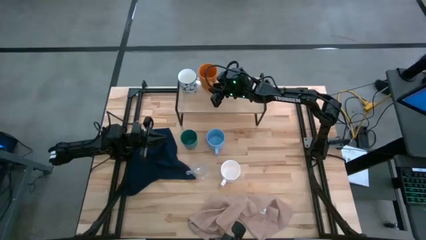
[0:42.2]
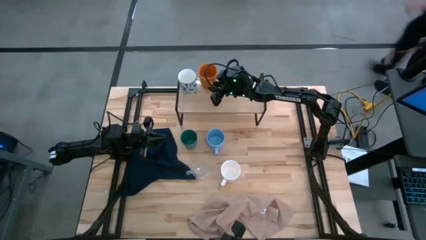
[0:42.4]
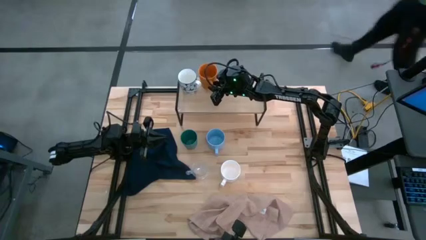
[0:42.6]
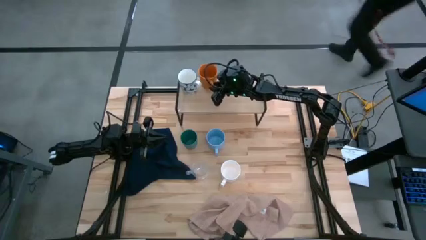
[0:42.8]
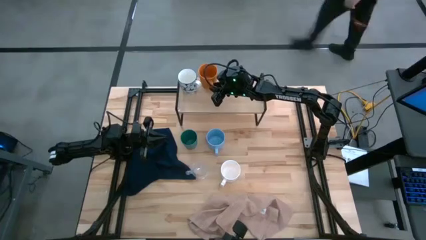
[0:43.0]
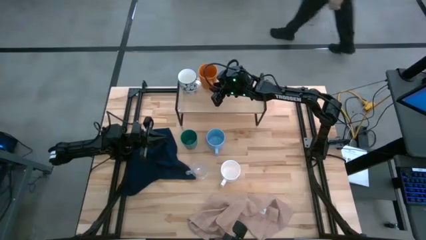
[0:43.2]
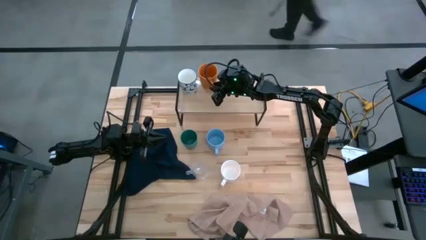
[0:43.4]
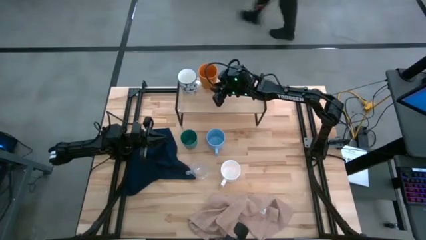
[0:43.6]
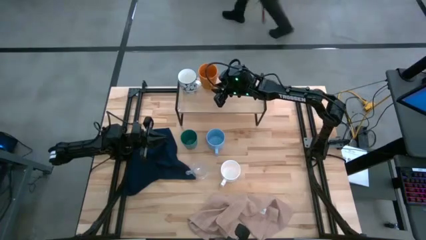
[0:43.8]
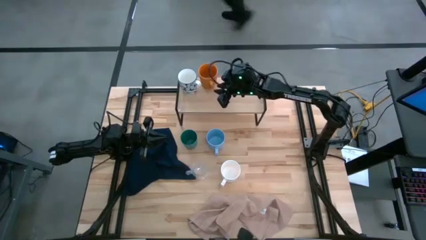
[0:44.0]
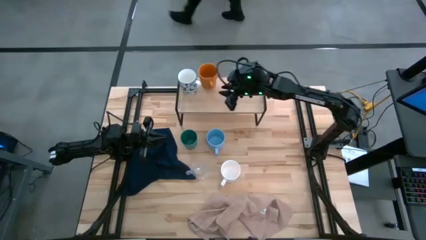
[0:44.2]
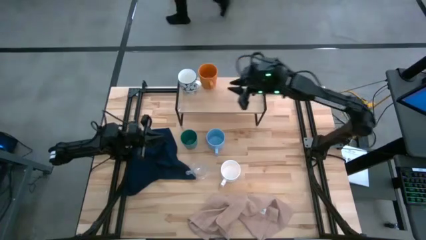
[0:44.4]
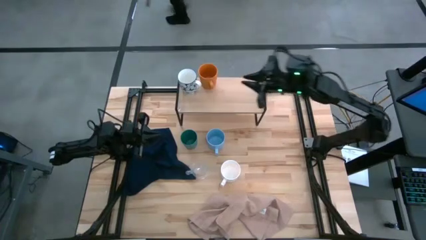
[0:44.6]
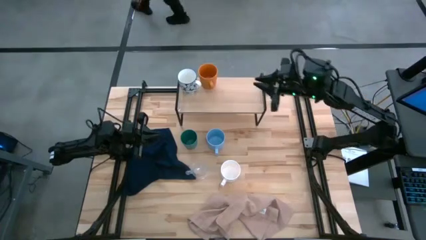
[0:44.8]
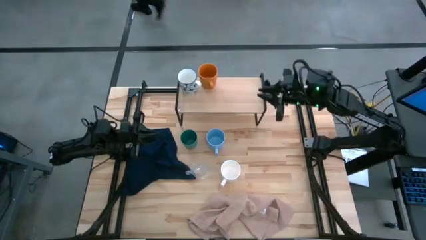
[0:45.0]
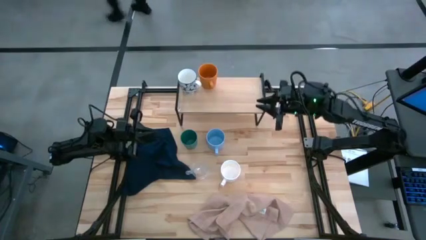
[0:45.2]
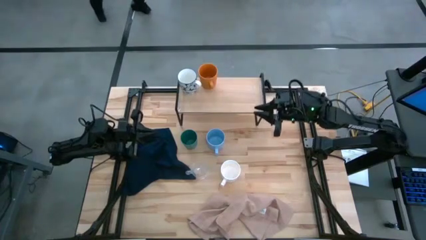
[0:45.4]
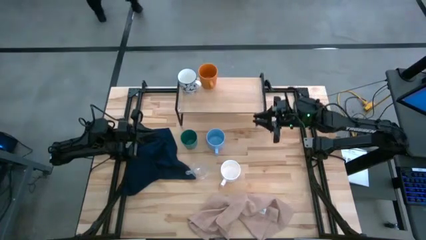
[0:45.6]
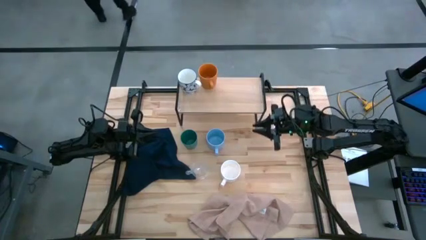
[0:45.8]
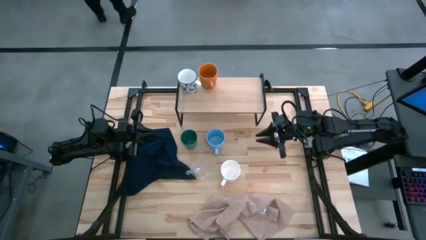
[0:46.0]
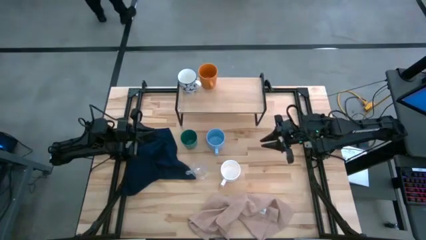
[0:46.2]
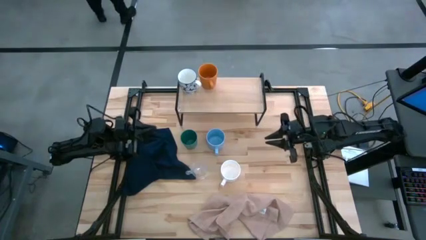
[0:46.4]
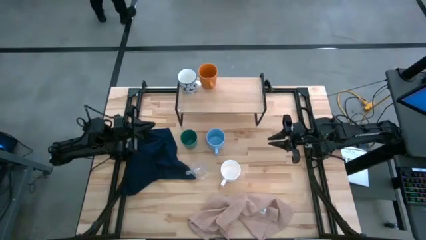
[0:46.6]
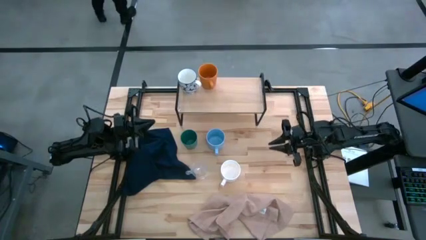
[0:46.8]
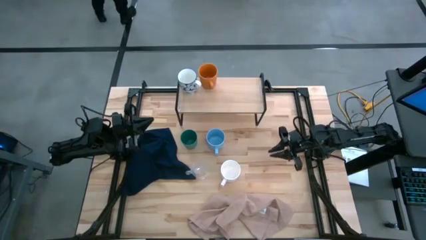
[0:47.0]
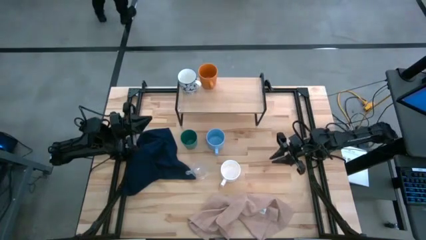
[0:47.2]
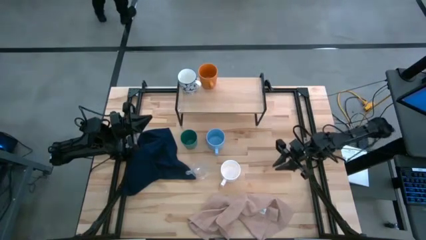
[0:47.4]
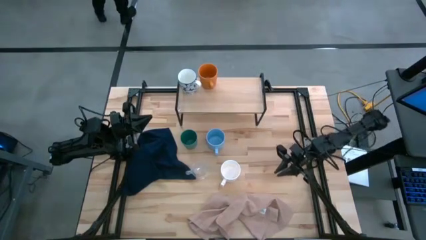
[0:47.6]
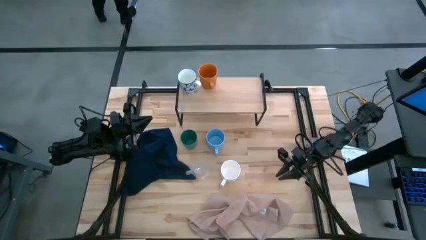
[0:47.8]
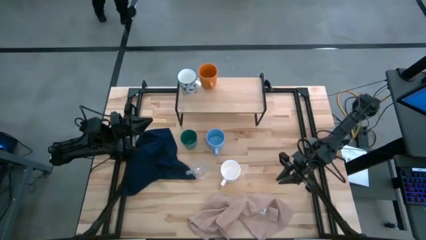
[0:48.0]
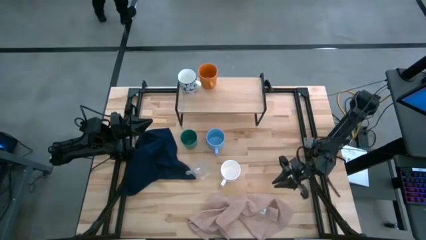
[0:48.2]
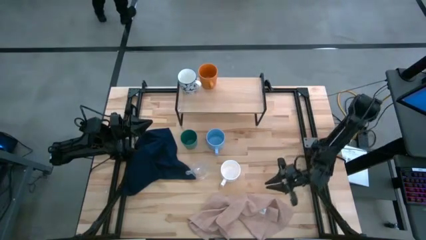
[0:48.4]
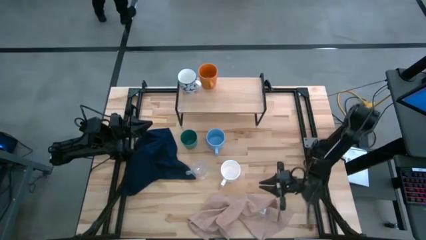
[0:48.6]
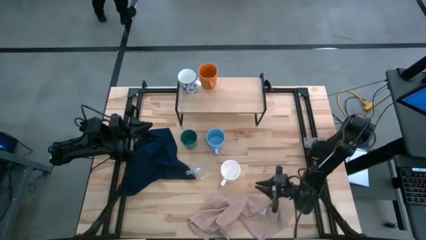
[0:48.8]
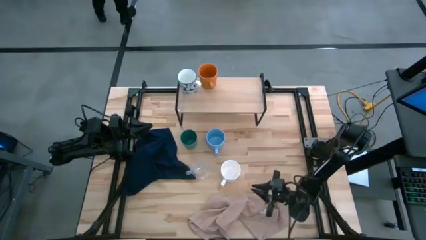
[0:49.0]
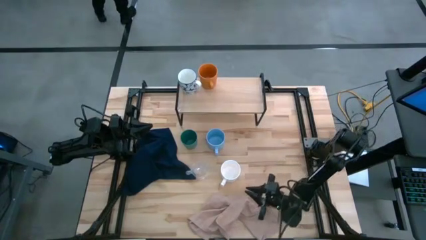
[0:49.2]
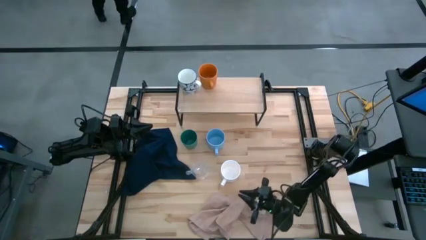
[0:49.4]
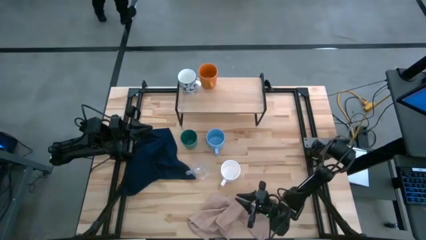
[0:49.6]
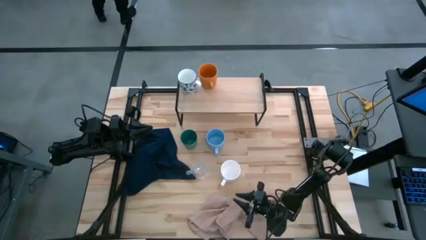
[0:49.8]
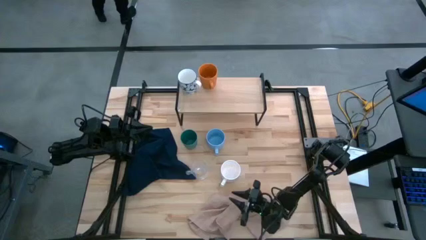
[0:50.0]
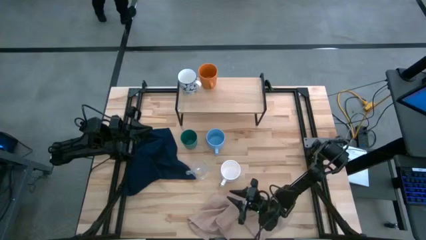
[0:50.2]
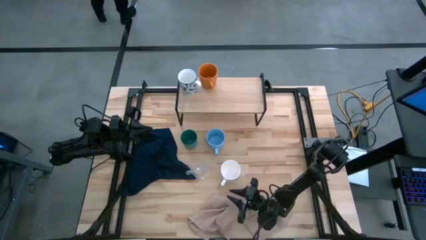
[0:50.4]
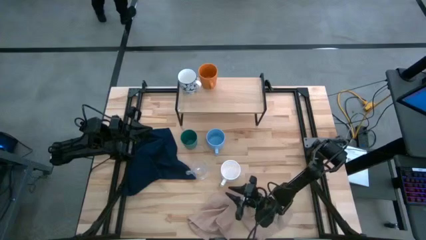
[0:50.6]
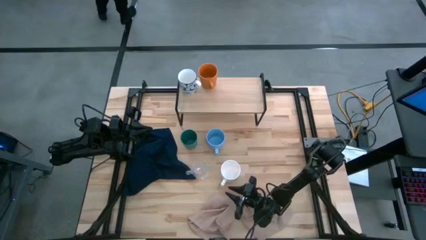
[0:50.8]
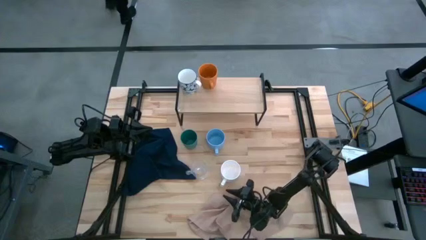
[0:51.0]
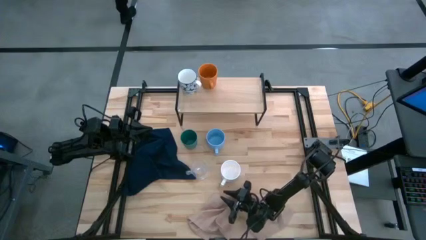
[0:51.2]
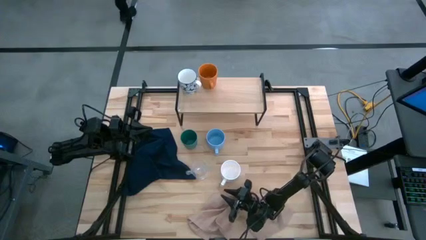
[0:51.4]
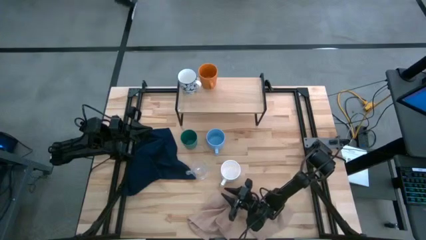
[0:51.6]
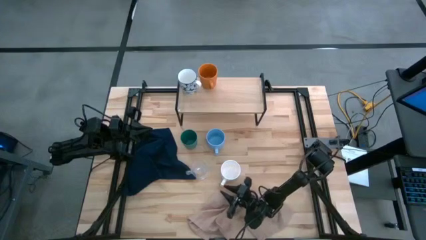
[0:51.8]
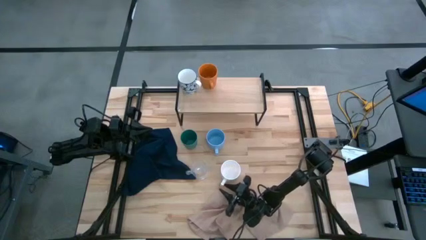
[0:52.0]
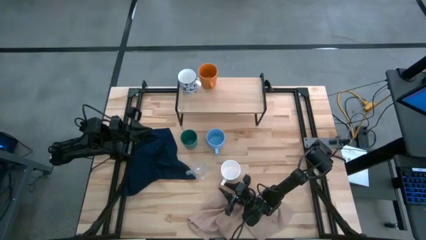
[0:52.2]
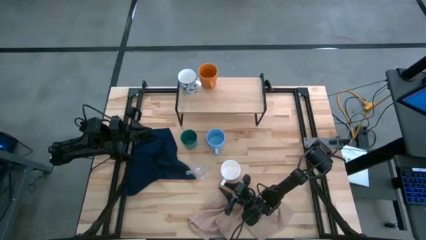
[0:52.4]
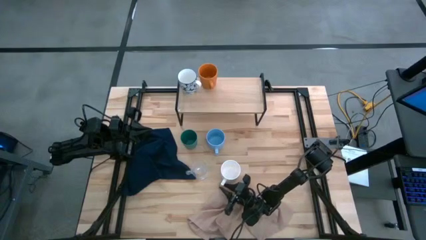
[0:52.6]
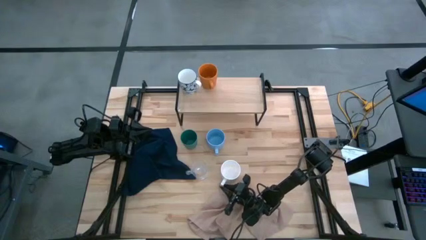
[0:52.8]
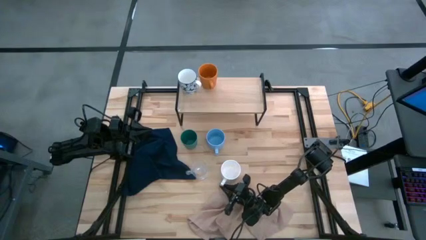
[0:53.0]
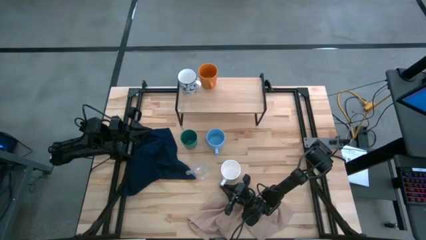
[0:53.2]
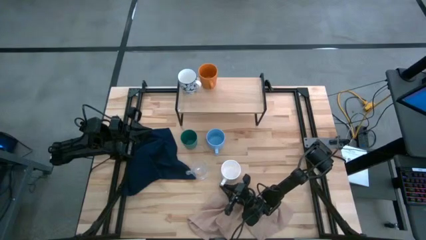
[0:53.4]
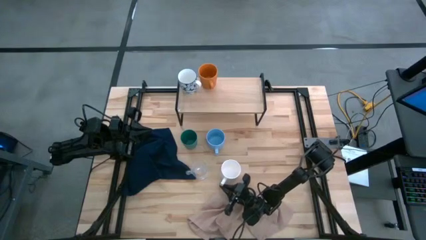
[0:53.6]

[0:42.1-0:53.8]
Task: Stack small to large cups/mugs on shelf
Put the white mug on the shelf
